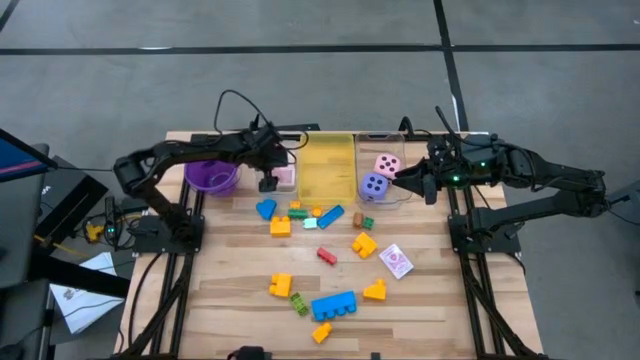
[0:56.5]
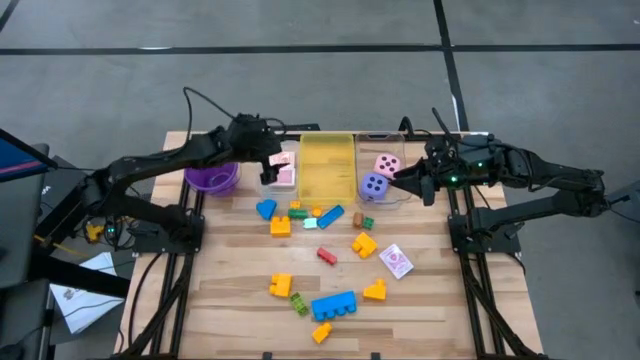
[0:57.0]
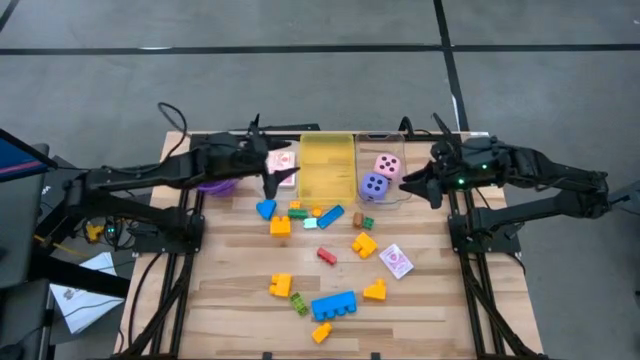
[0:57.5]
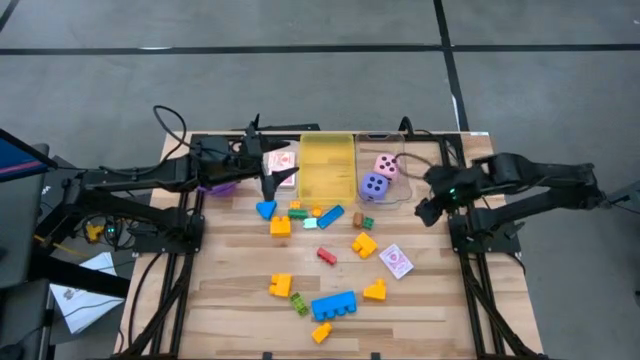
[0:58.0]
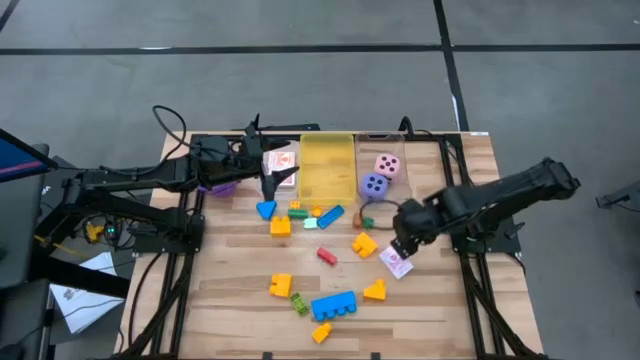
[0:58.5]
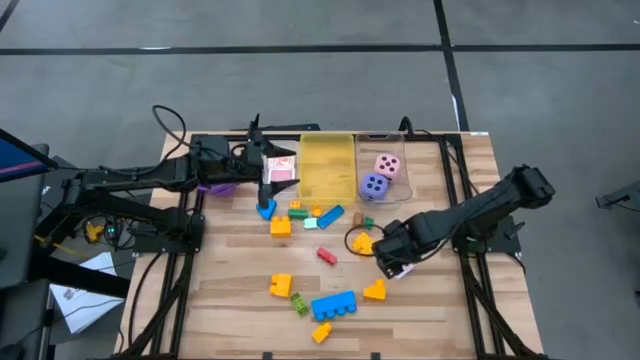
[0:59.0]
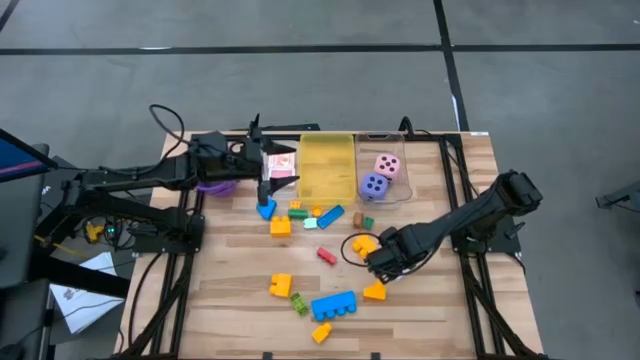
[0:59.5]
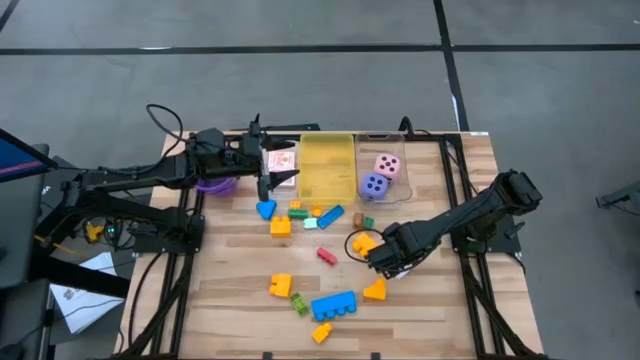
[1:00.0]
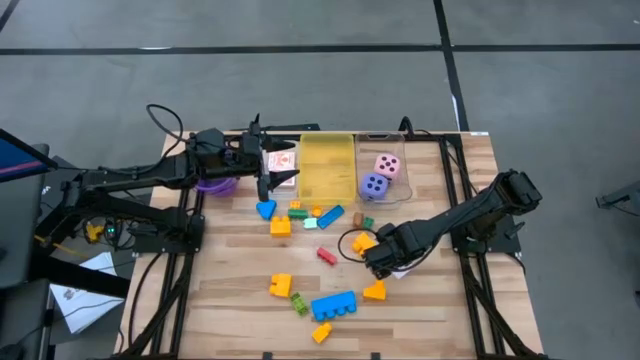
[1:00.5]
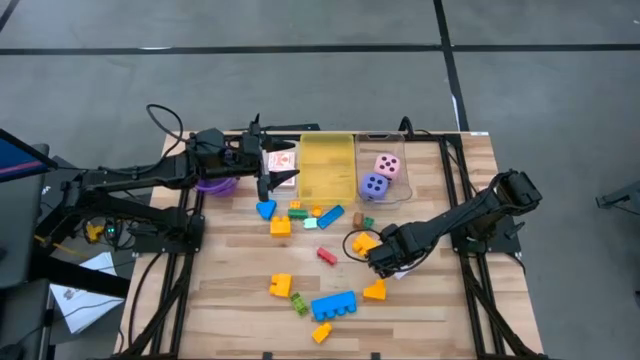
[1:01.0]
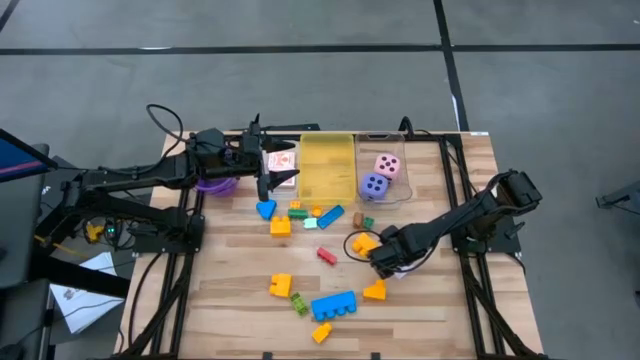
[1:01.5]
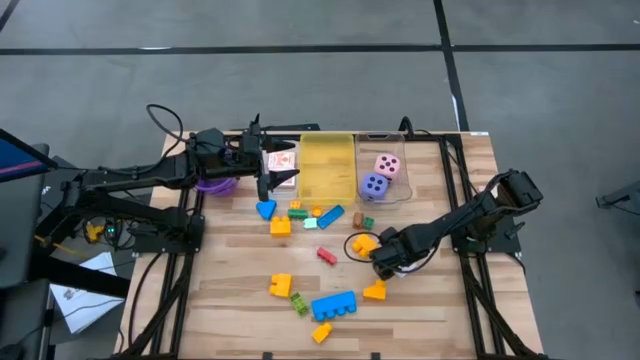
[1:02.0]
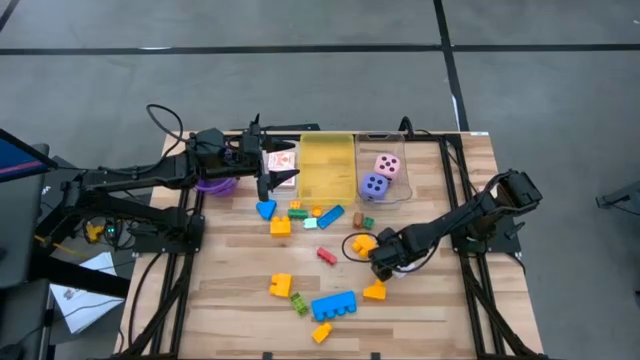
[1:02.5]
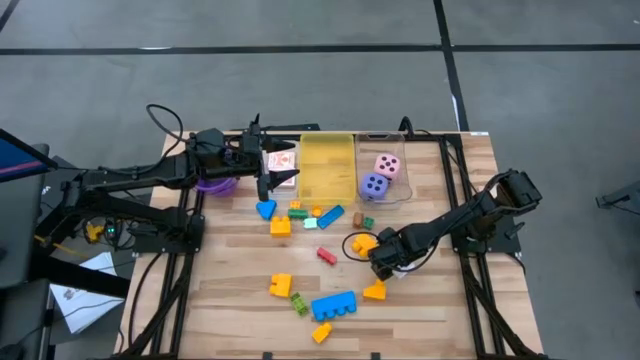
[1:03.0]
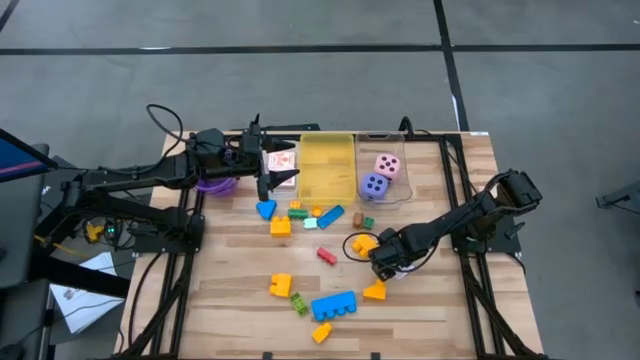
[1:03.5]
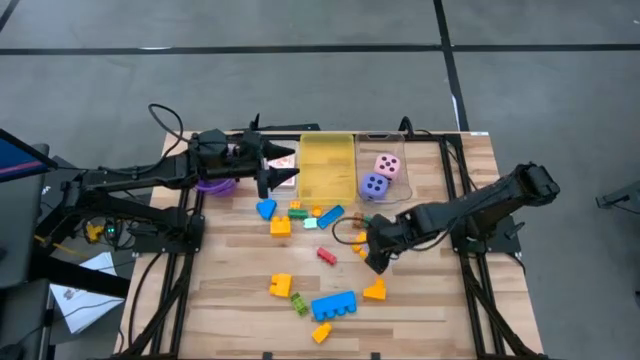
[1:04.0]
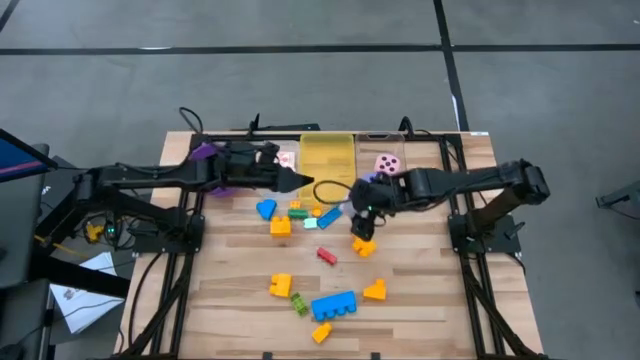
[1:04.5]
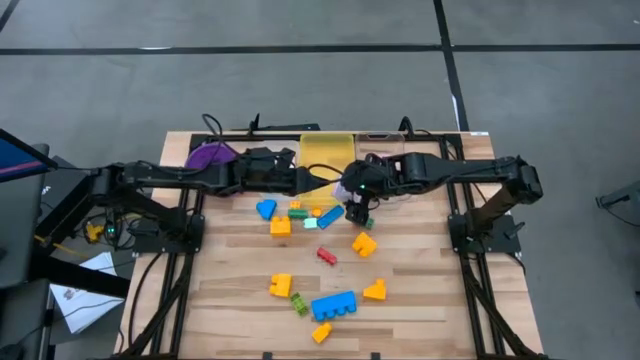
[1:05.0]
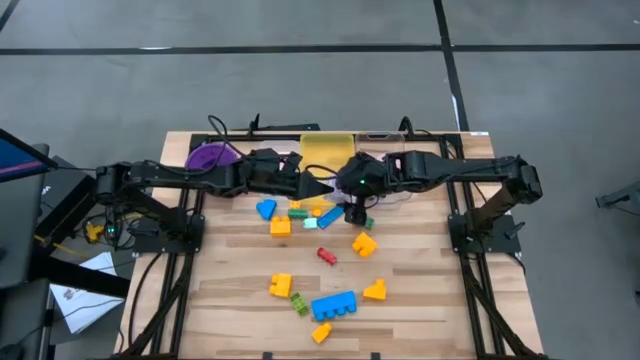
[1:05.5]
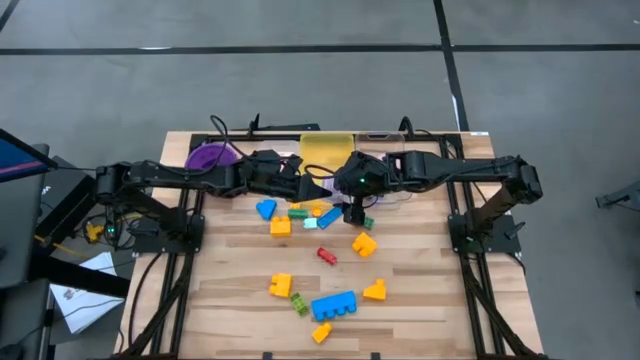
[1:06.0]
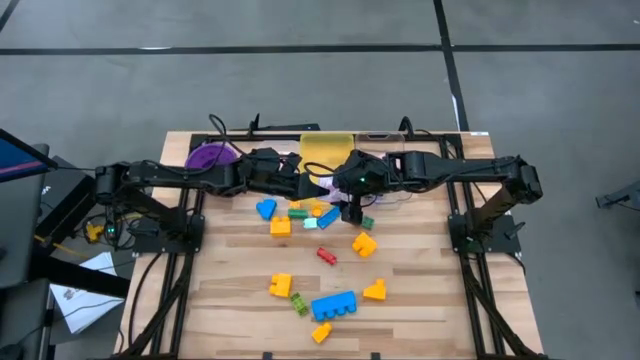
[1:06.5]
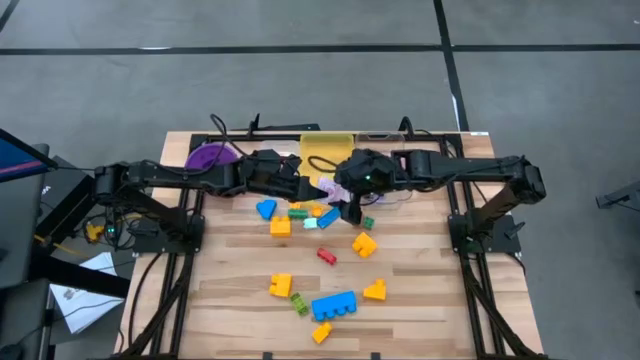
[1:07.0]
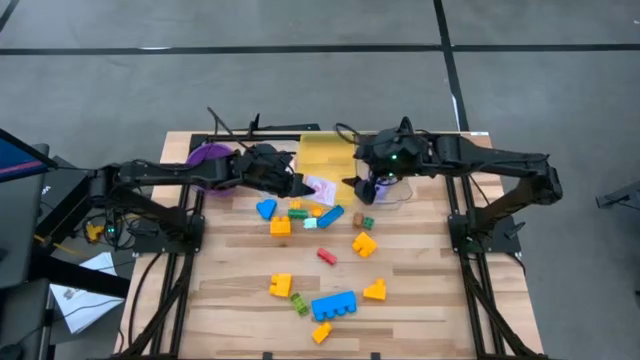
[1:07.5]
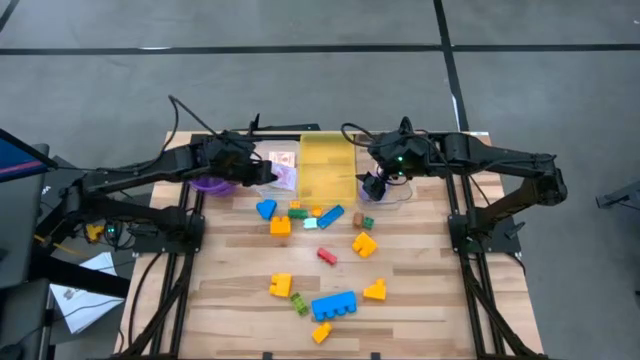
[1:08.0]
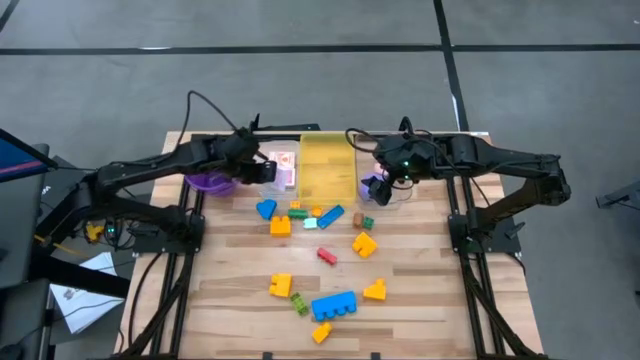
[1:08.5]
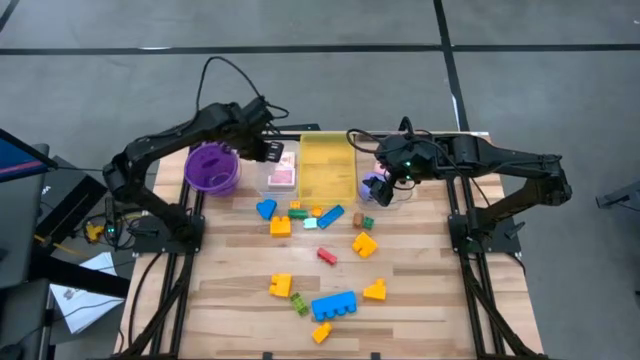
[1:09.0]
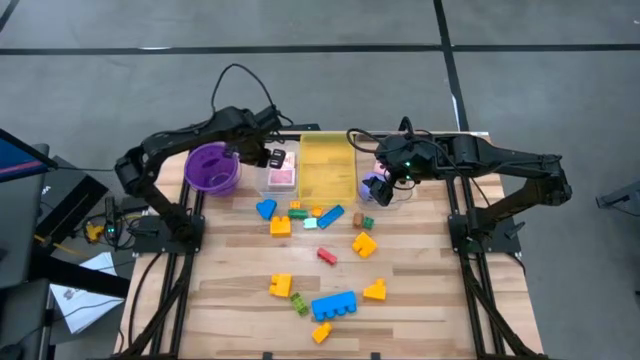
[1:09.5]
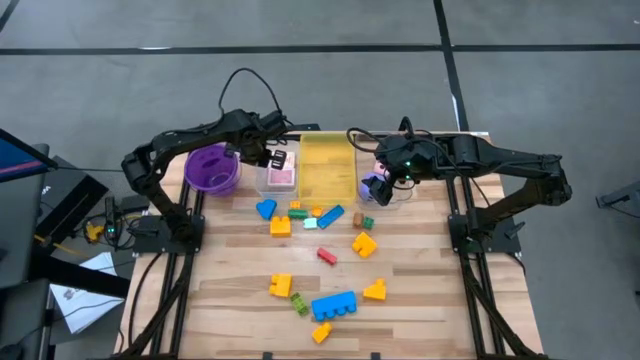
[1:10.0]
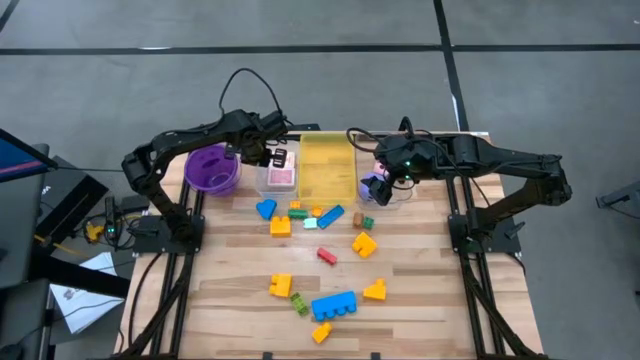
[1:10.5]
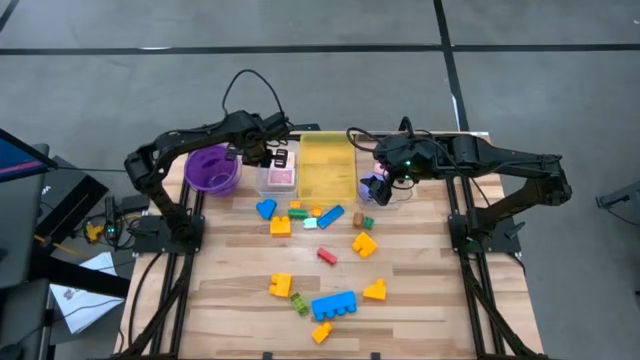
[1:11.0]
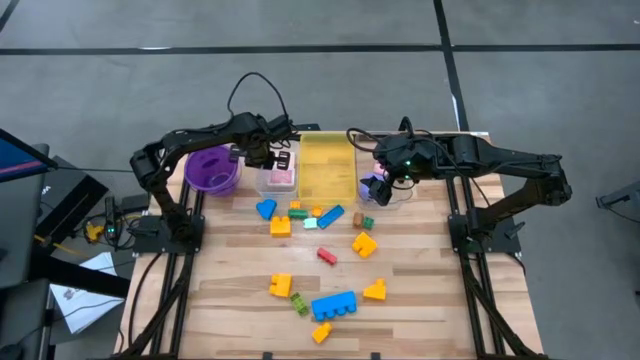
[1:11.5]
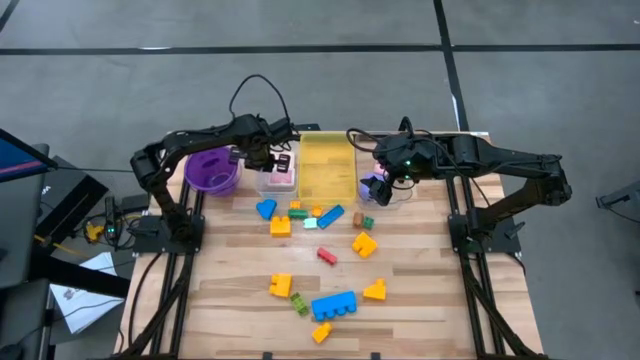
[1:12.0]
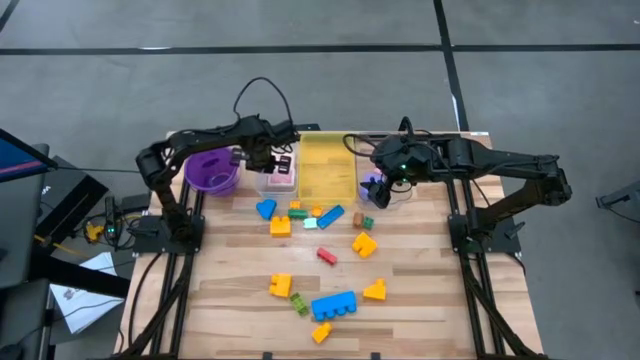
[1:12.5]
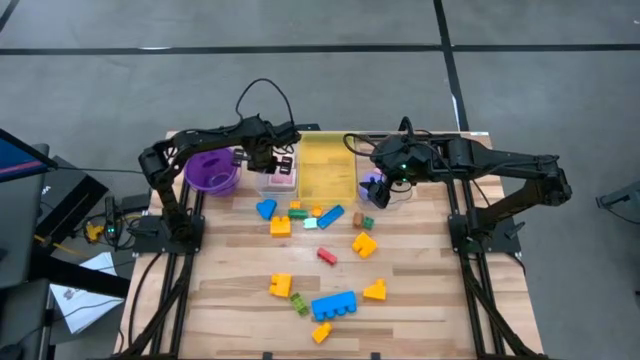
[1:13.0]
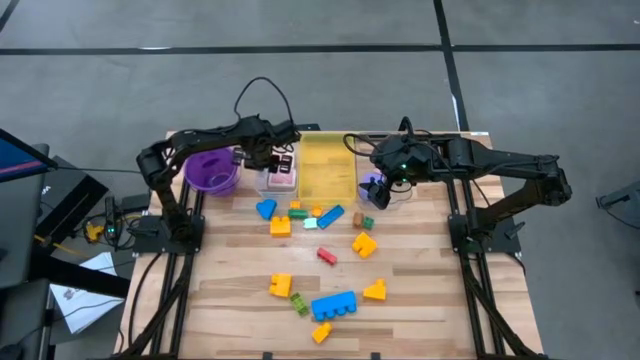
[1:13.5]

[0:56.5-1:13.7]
Task: Pick & Place Toys
Put the pink deck of cards into the white bin

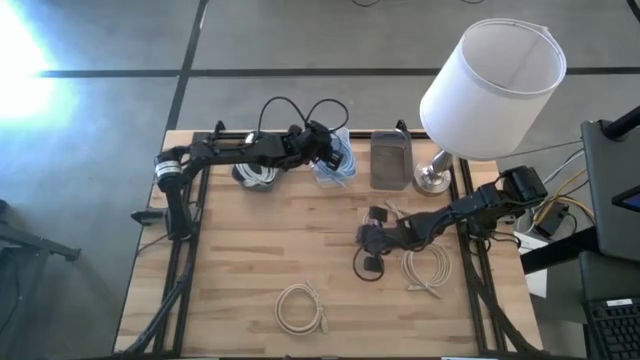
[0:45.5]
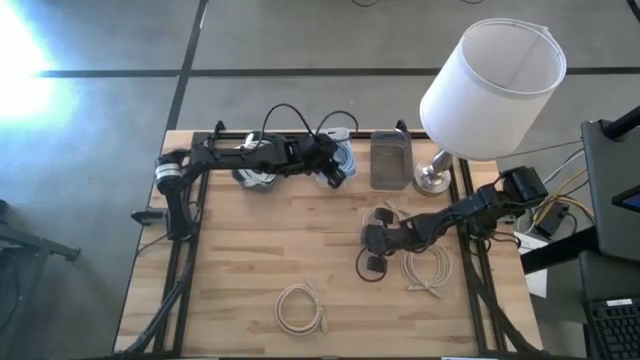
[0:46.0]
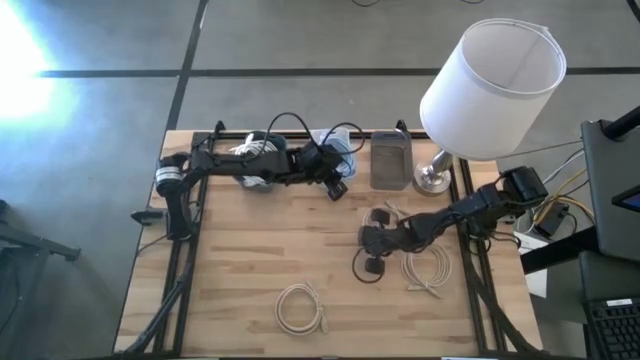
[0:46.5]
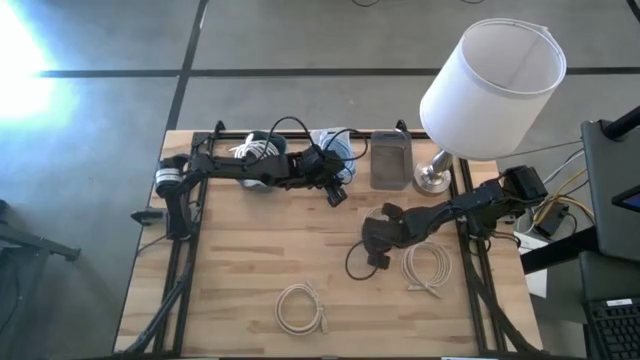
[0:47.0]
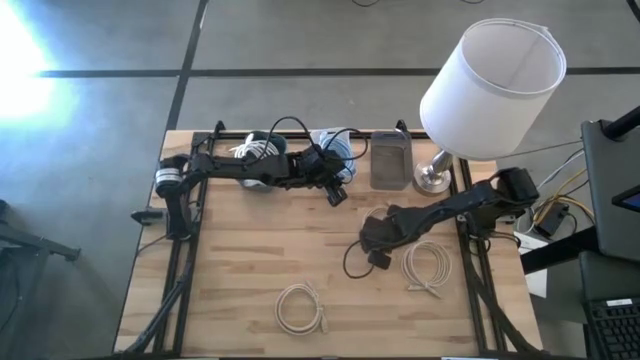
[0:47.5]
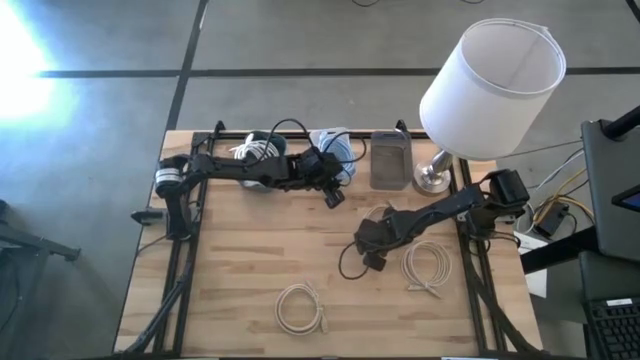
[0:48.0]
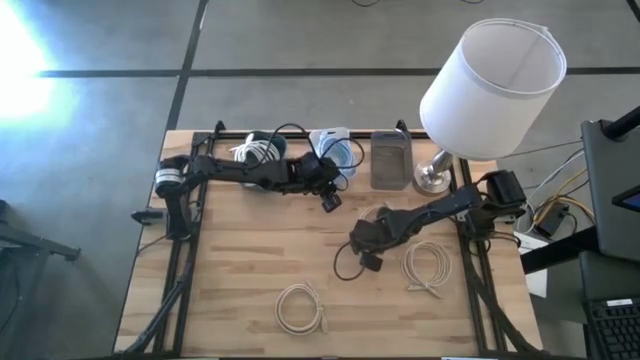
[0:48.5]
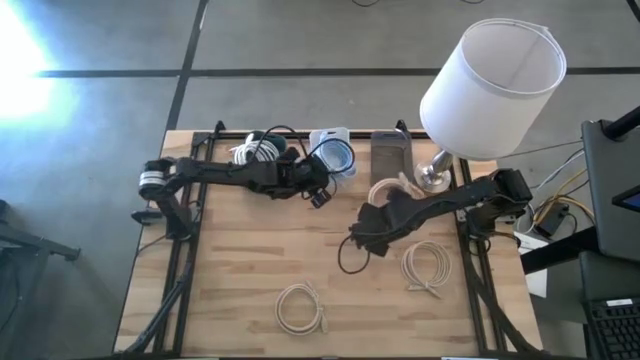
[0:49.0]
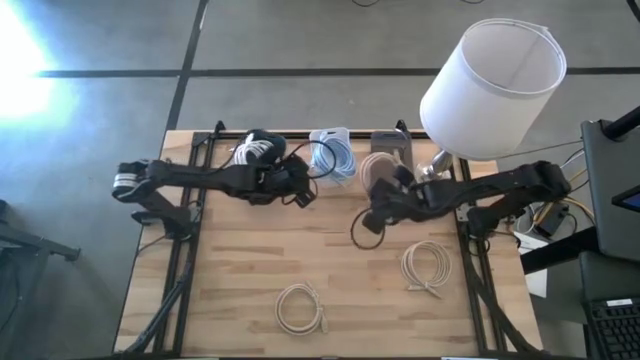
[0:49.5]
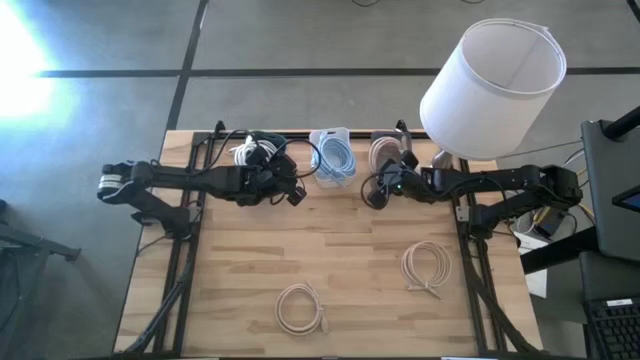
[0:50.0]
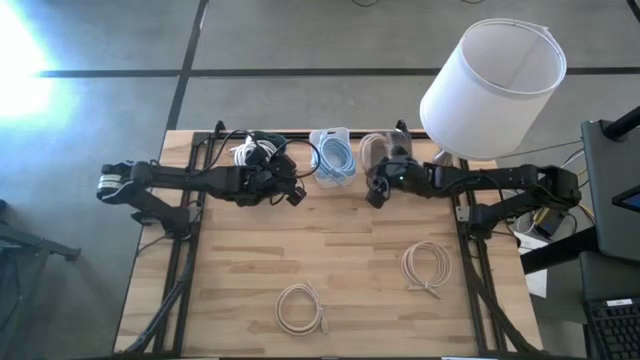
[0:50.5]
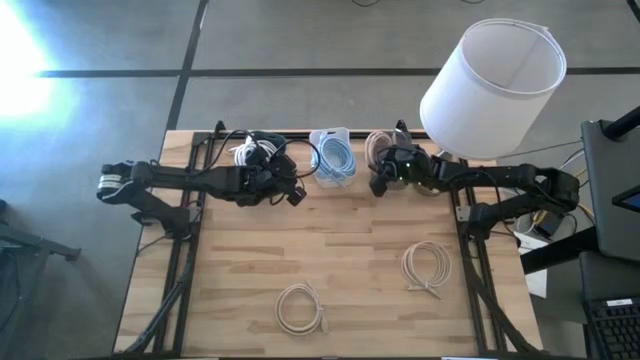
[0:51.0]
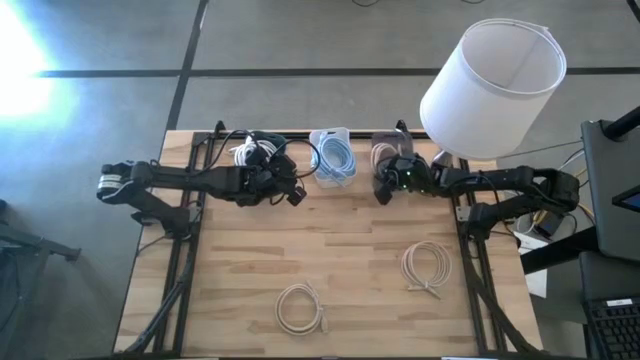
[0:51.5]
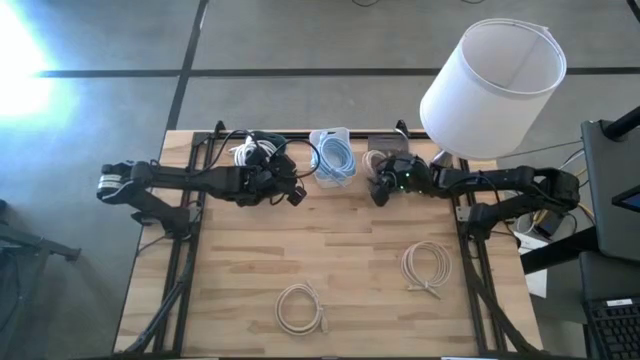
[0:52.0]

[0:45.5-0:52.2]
Task: Sort HDMI cables
Put the top brown HDMI cable into the black bin
